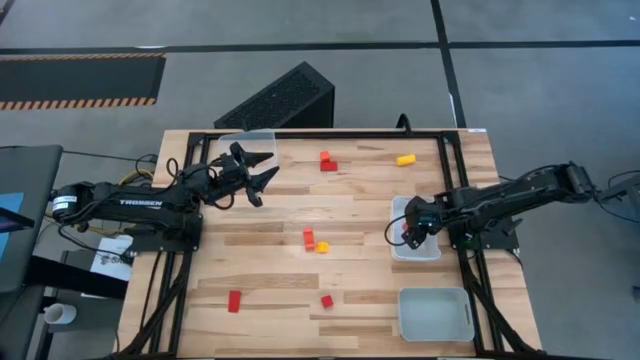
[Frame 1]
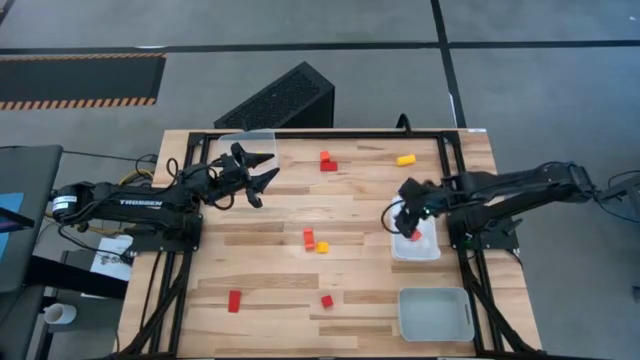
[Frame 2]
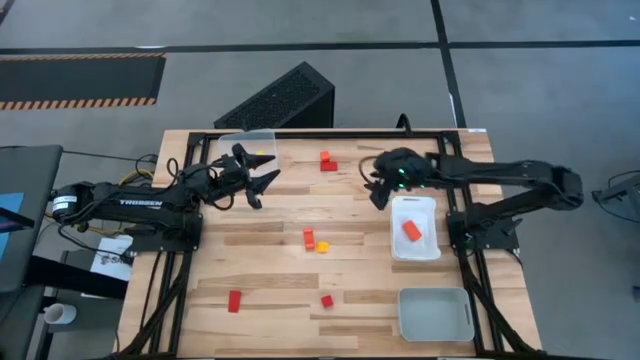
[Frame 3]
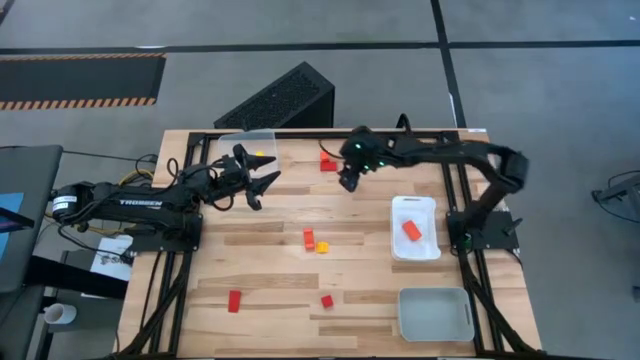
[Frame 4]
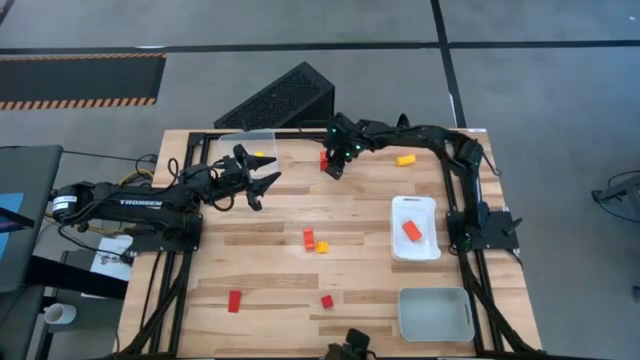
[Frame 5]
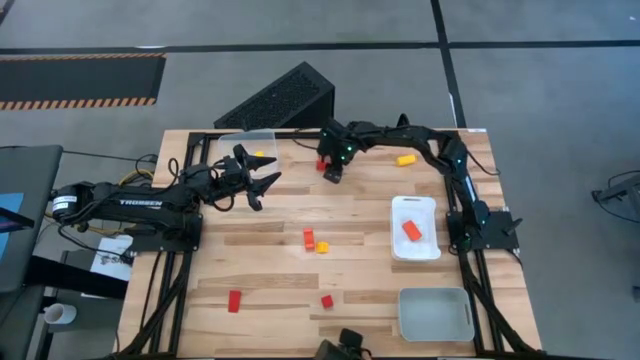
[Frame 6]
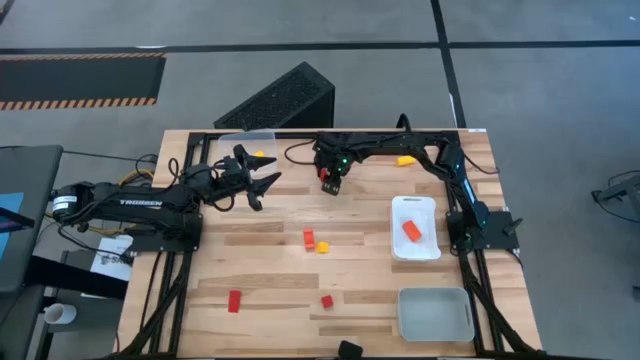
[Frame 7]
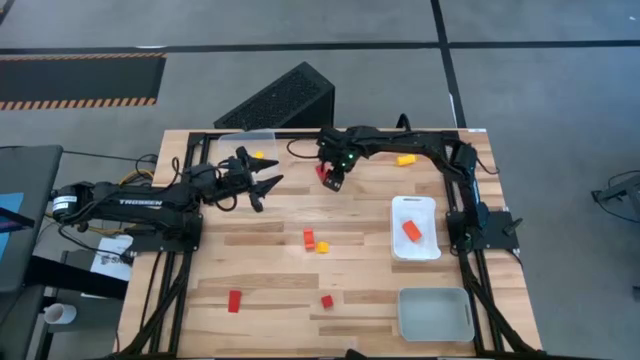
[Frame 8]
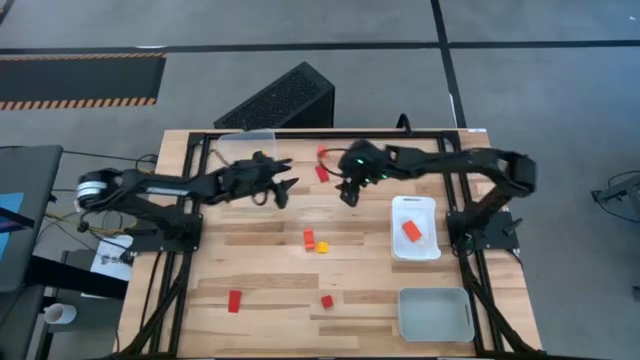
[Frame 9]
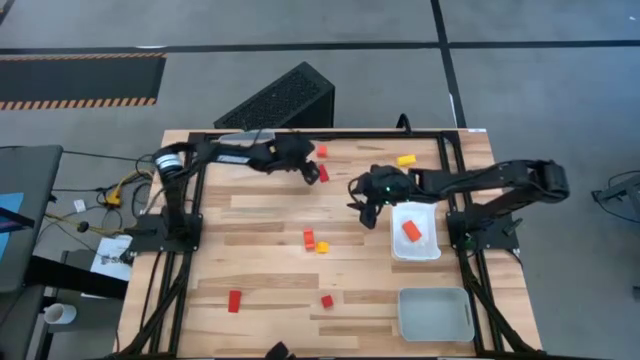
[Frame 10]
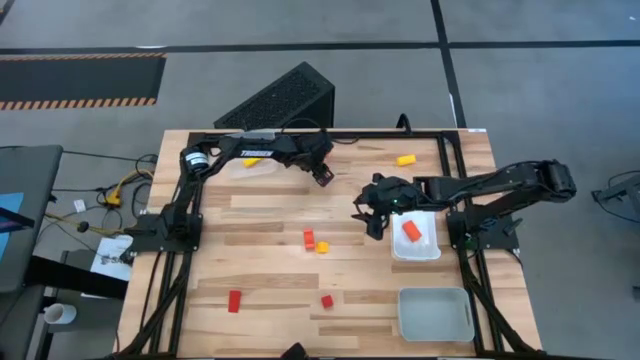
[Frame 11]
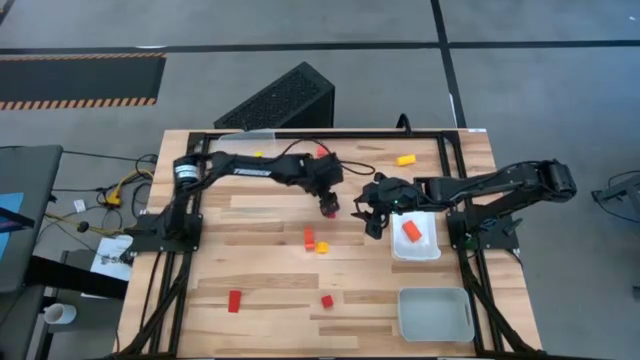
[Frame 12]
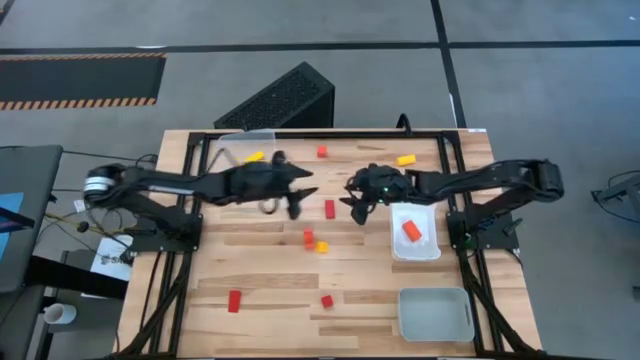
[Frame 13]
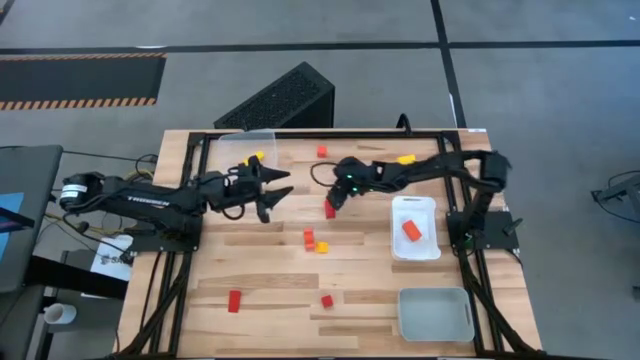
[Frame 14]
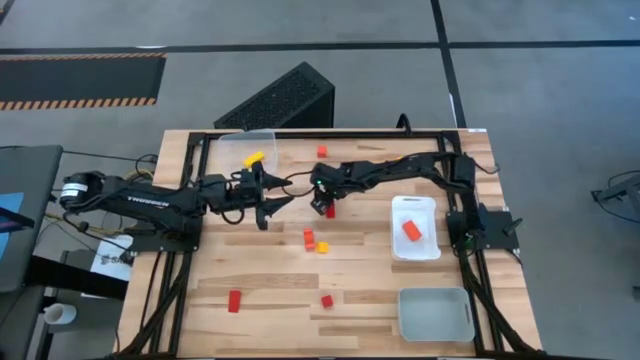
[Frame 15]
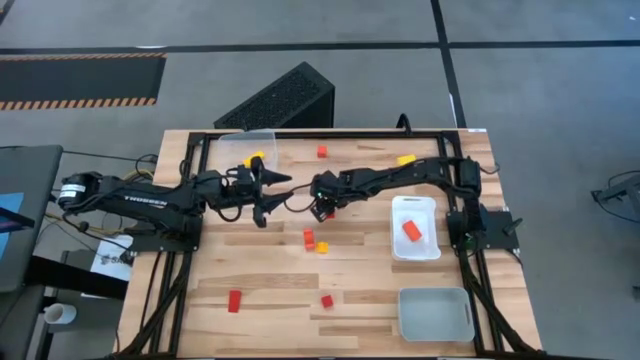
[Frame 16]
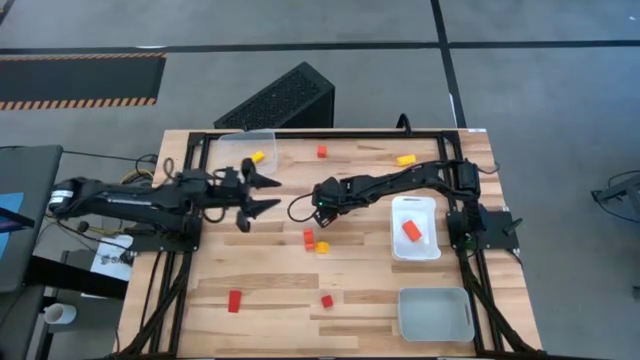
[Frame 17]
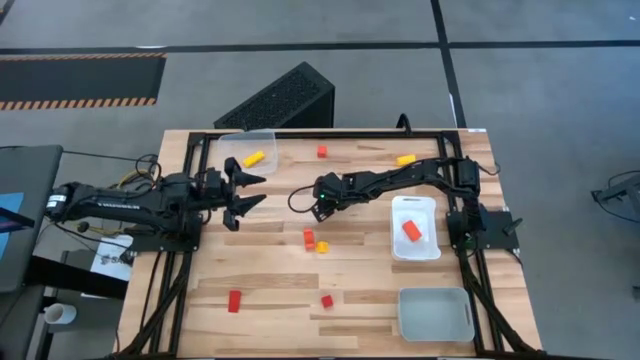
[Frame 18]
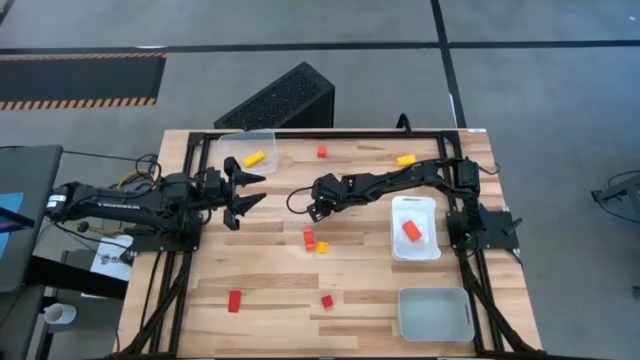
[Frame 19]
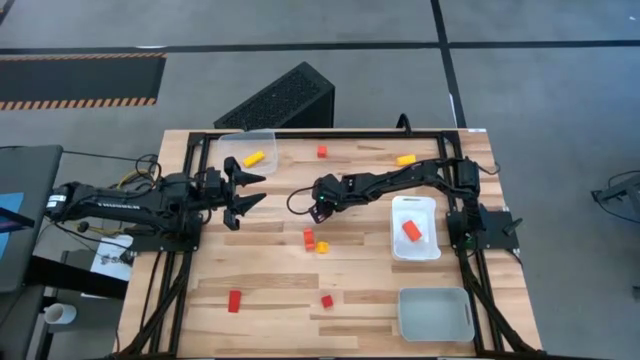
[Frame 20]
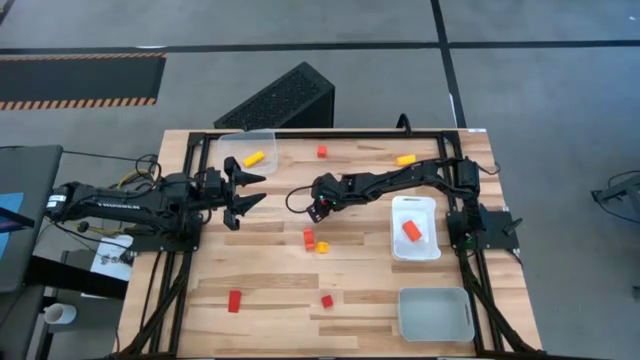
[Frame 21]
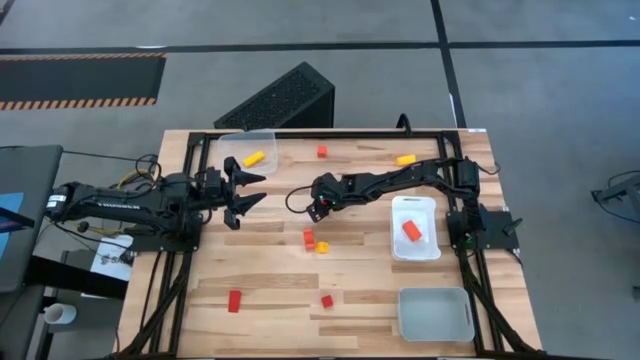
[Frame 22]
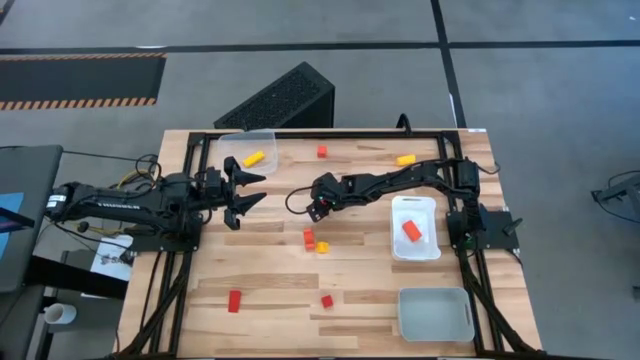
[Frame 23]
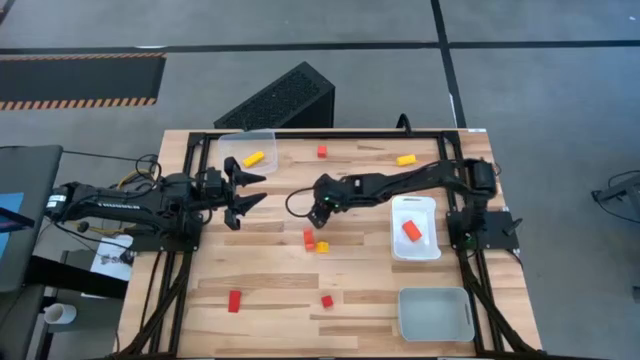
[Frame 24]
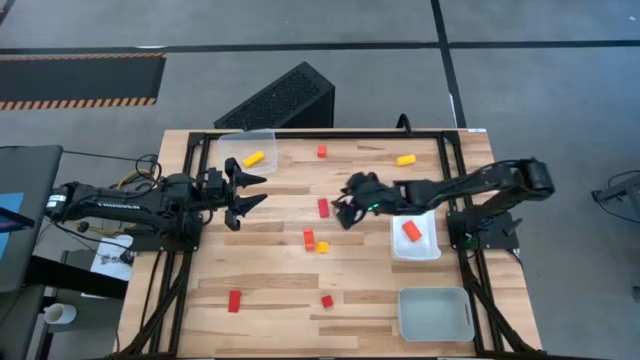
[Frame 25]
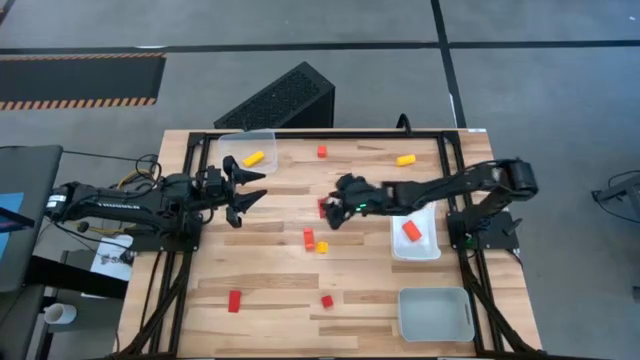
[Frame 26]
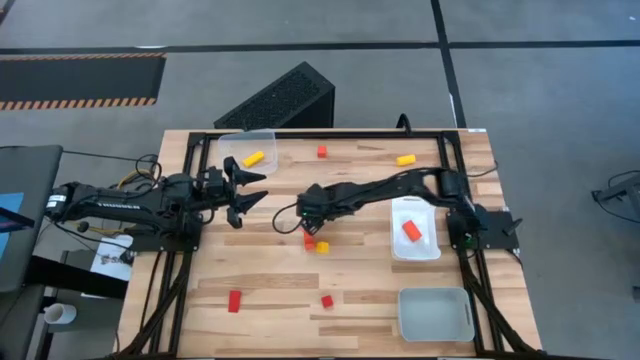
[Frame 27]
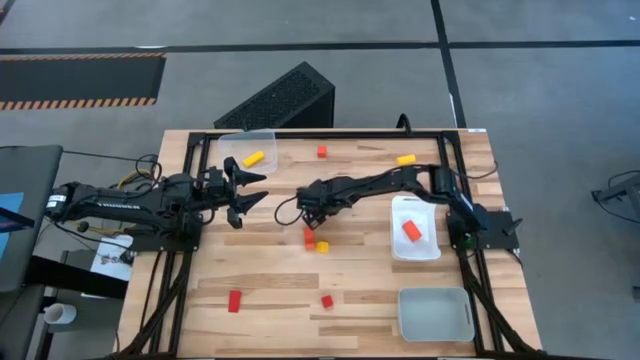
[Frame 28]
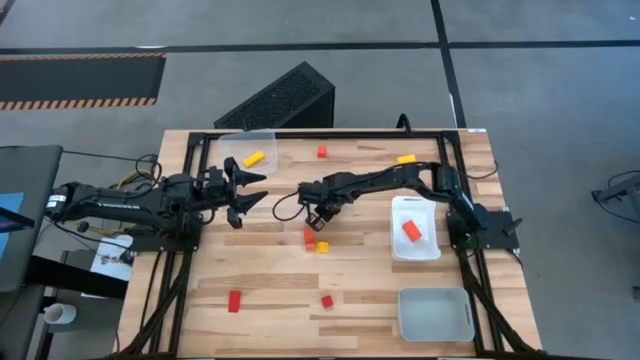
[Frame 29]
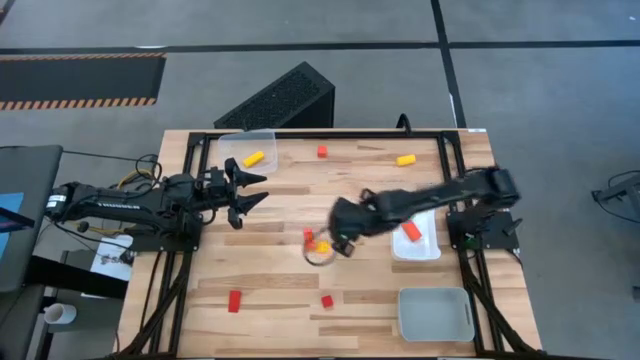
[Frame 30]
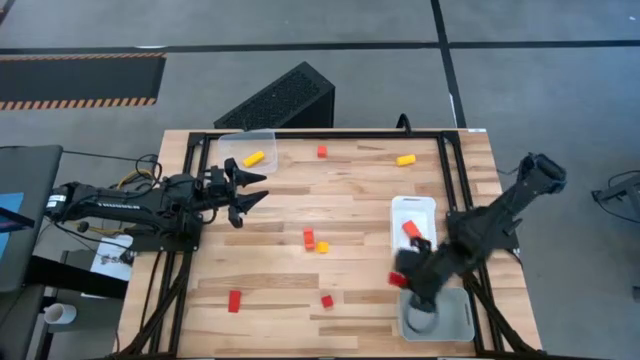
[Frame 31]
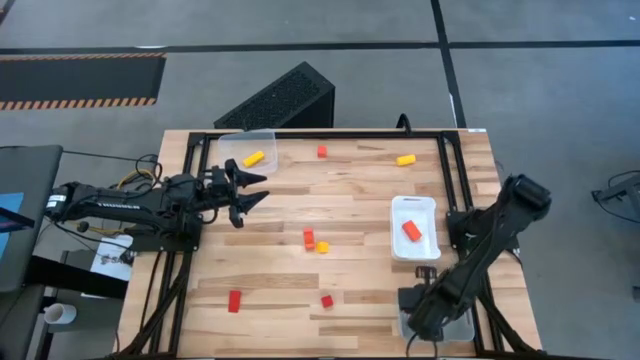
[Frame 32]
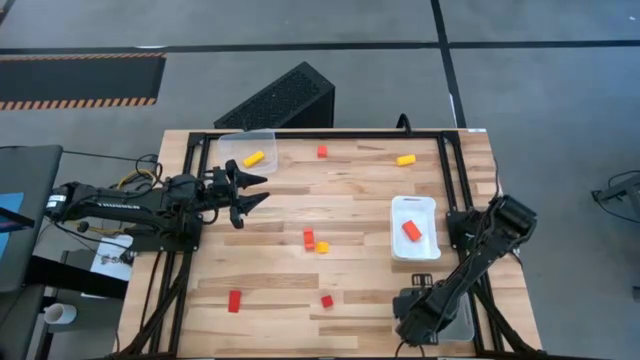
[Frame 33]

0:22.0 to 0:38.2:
Task: Sort & place blocks by color
Put the top red block into the gray bin

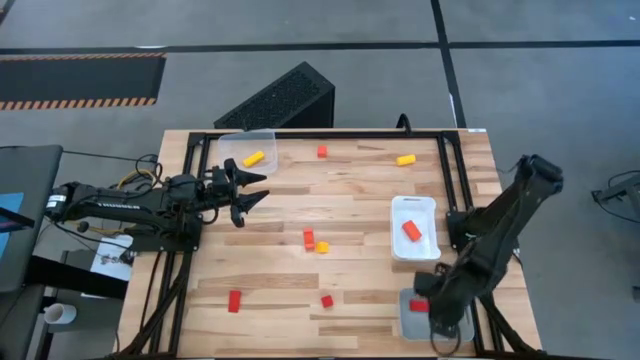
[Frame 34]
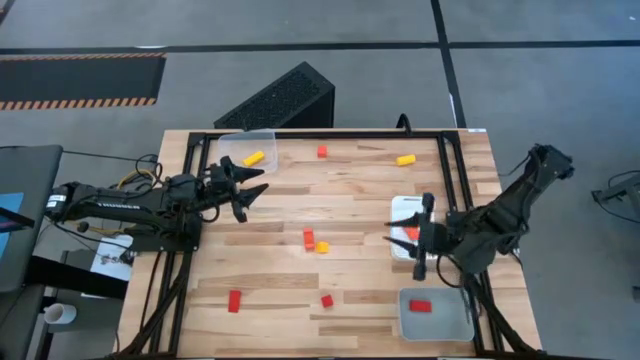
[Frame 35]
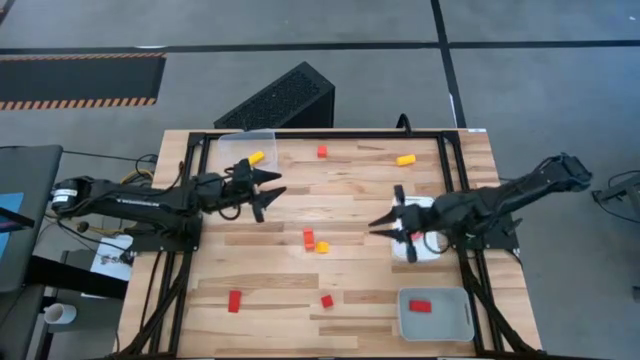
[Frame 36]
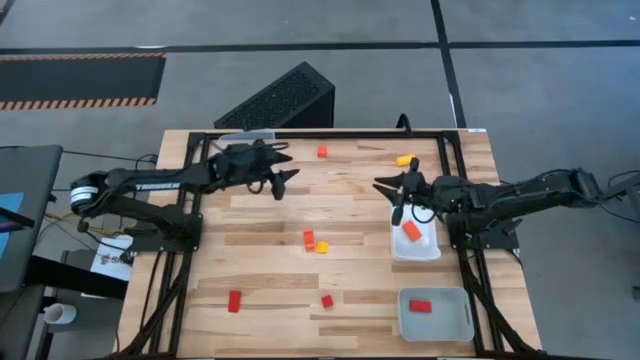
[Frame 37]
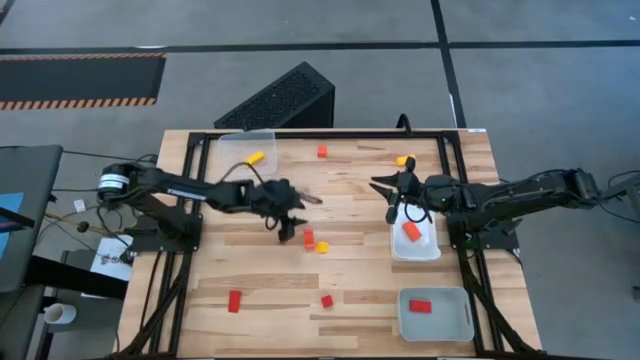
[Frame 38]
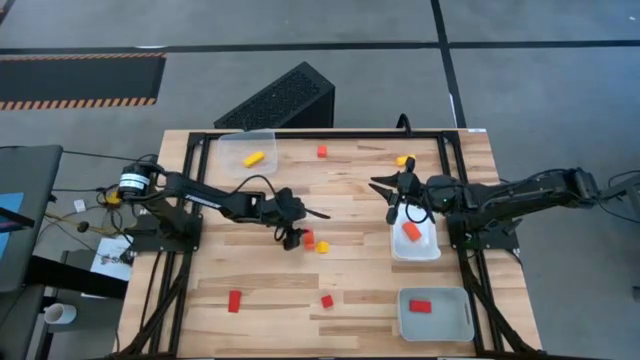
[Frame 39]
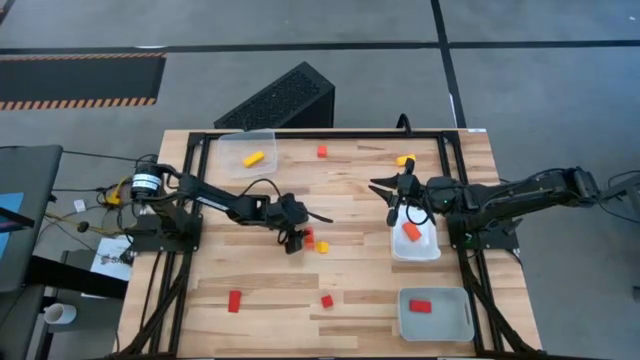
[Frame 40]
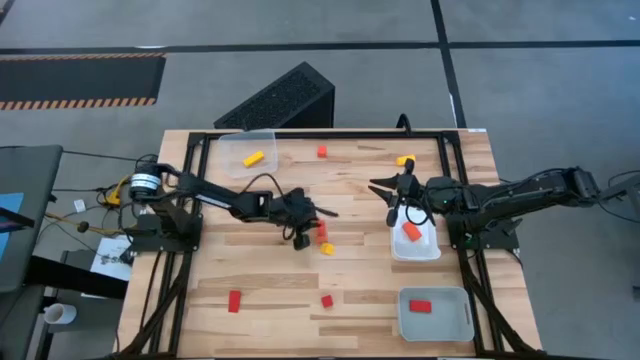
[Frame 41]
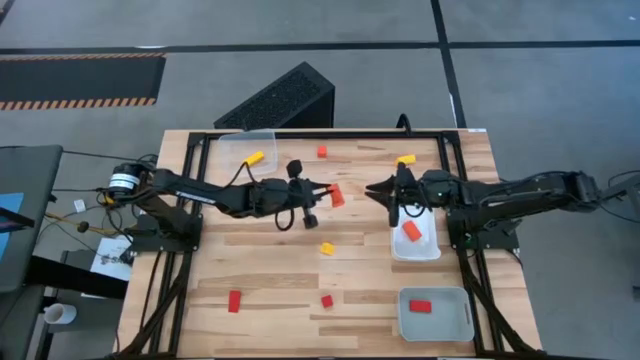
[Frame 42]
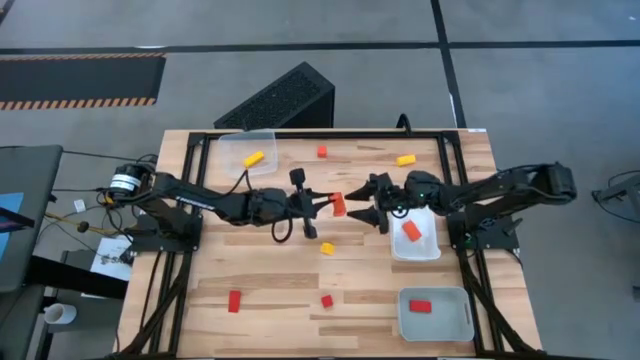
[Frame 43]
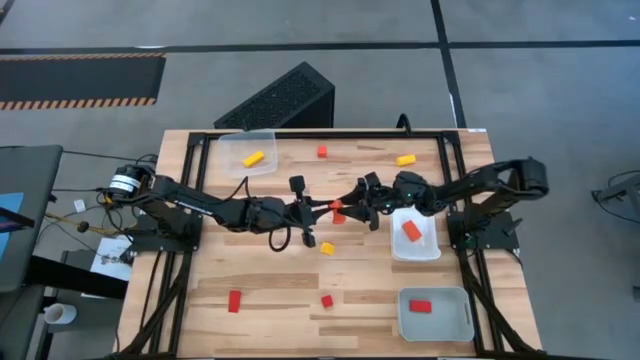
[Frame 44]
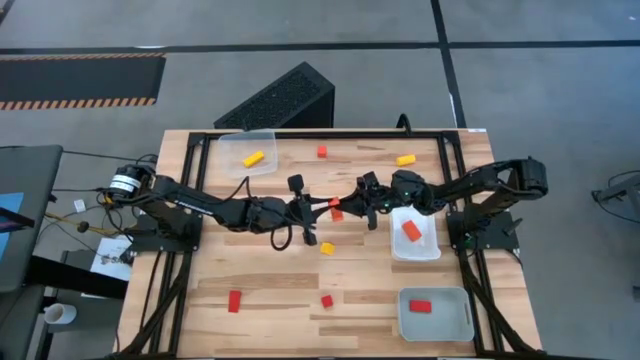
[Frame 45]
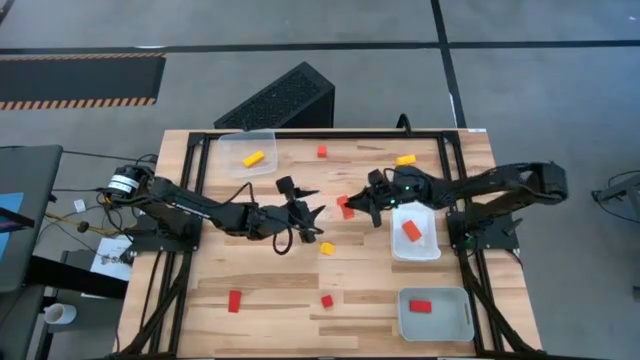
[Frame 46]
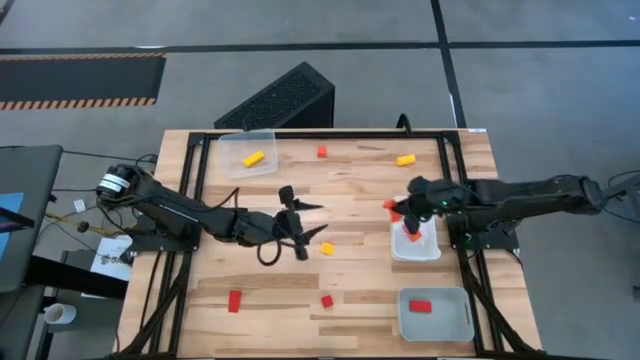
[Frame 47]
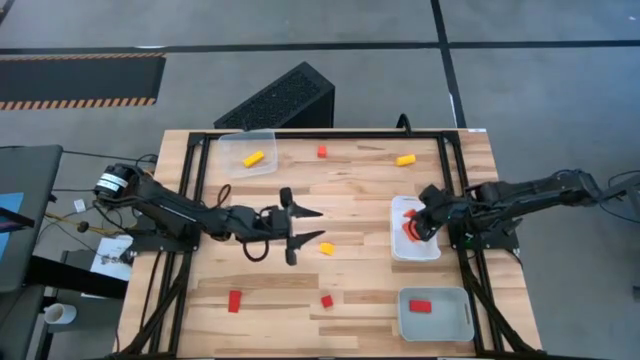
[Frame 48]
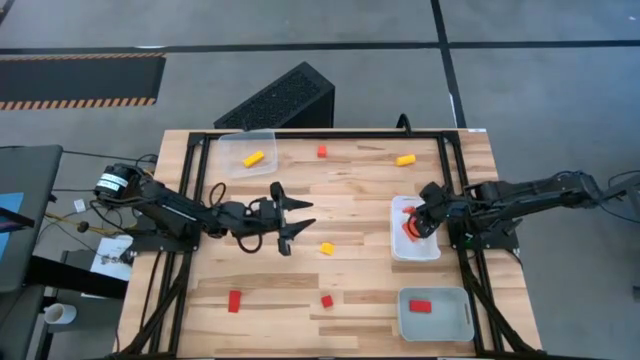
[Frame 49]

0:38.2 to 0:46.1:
Put the bottom orange block into the white bin
